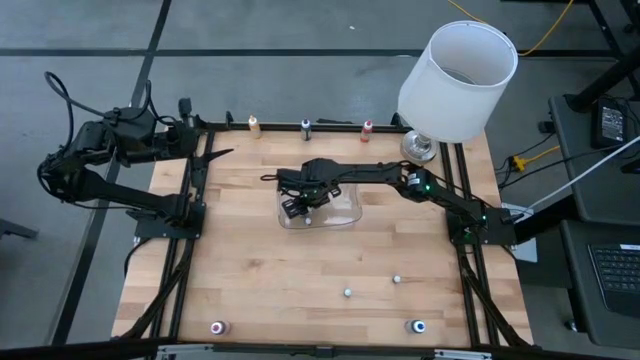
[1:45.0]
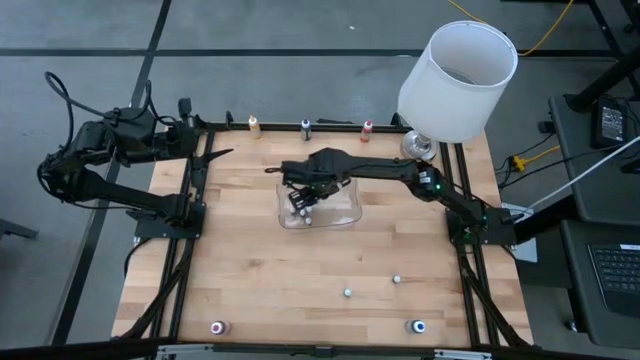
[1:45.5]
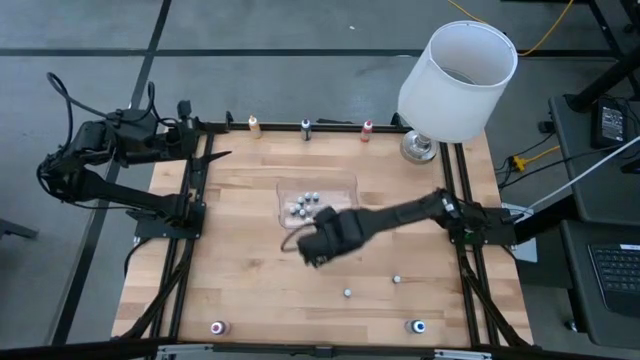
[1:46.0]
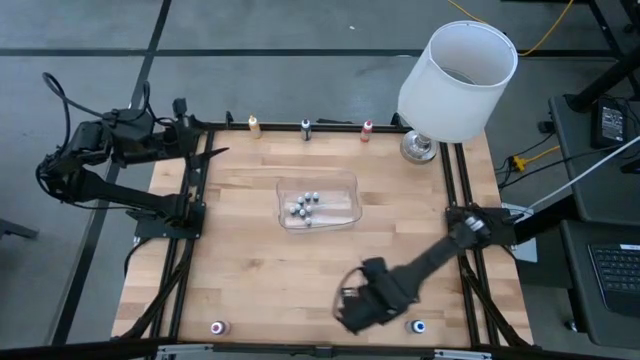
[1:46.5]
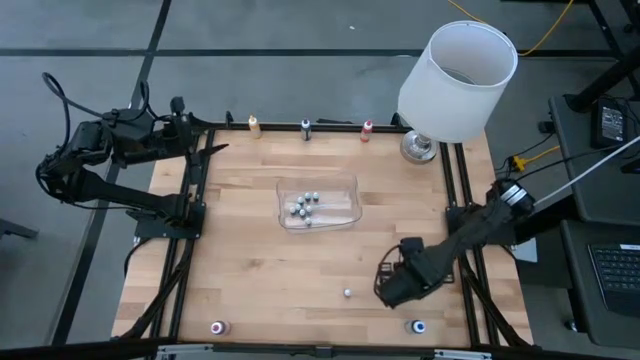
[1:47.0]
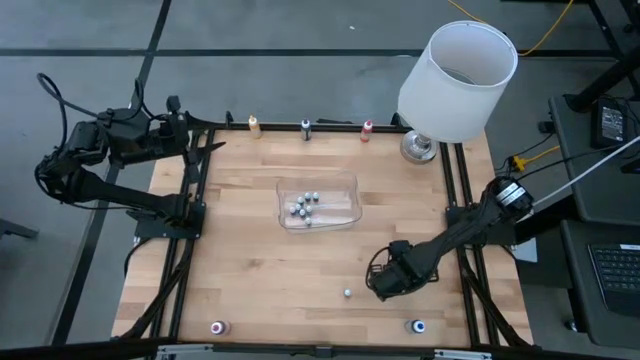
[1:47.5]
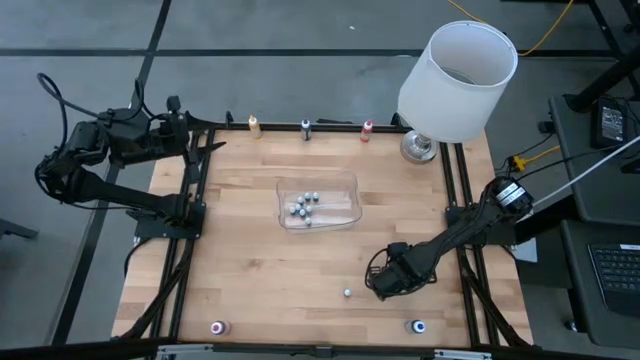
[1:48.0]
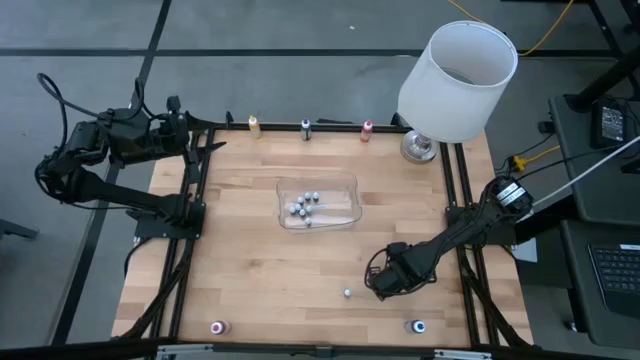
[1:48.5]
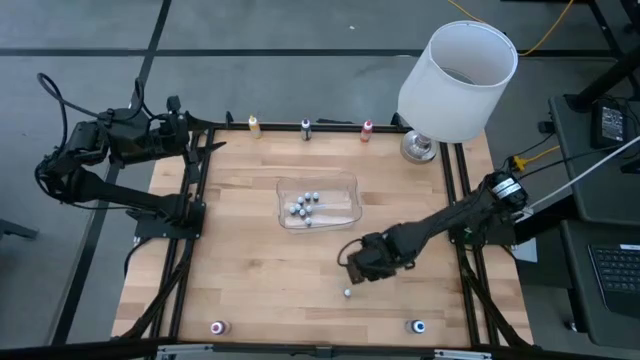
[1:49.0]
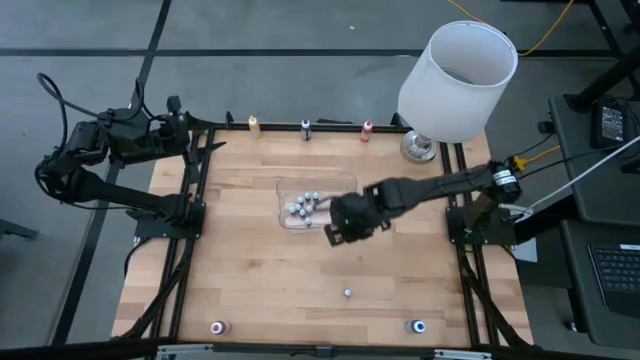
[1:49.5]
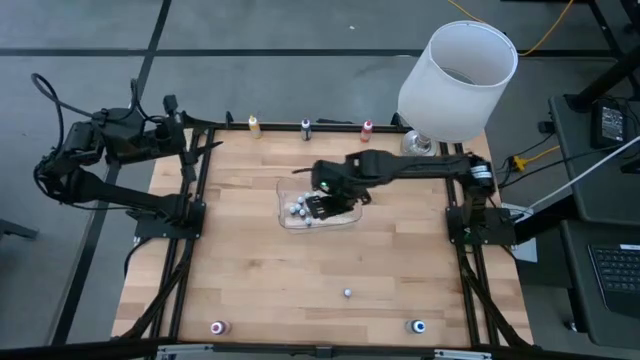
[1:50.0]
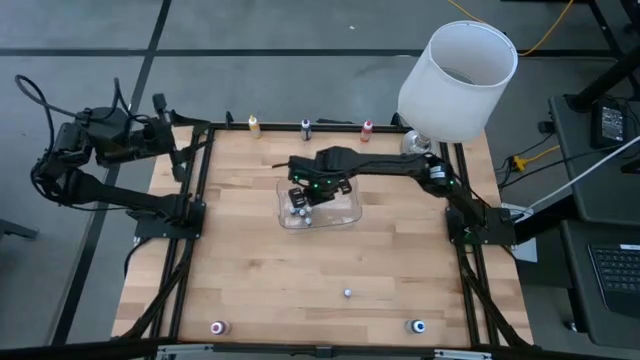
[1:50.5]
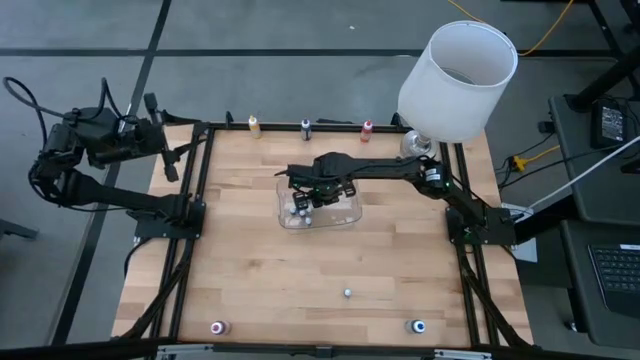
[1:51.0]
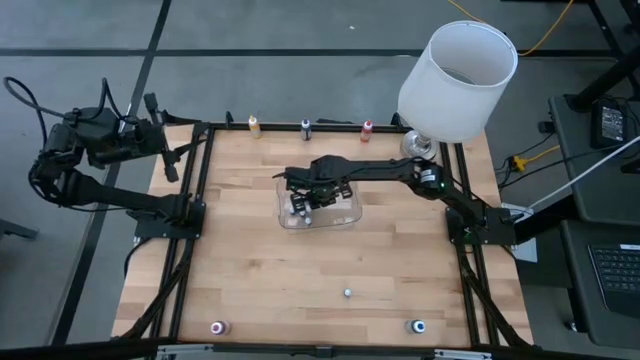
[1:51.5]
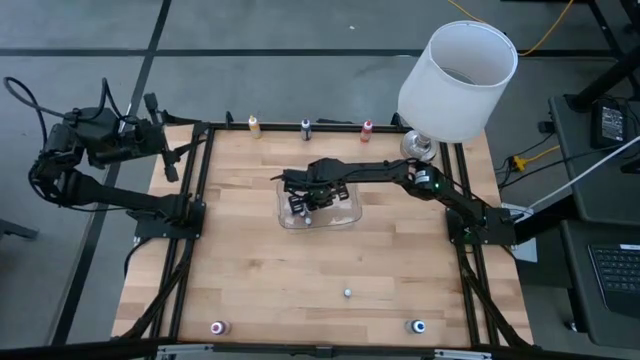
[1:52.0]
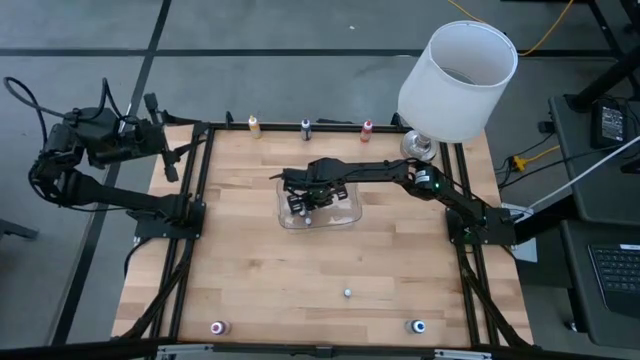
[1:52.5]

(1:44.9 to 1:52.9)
Task: Pick & Place food coloring
Put the pink food coloring bottle into the transparent bin

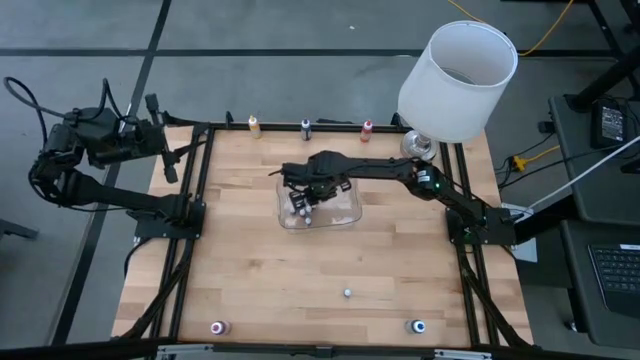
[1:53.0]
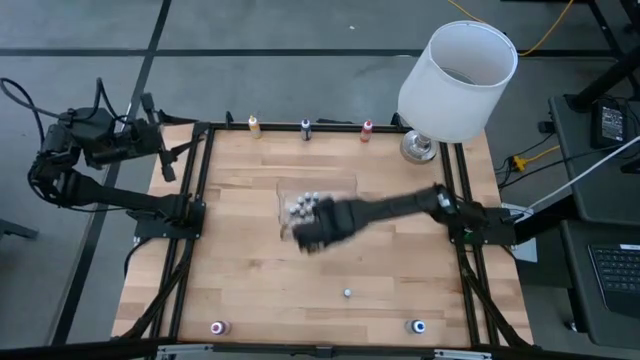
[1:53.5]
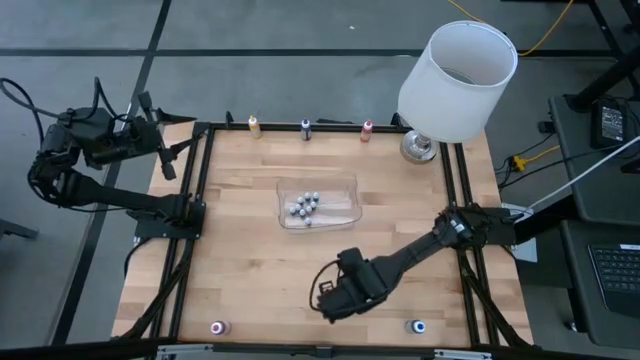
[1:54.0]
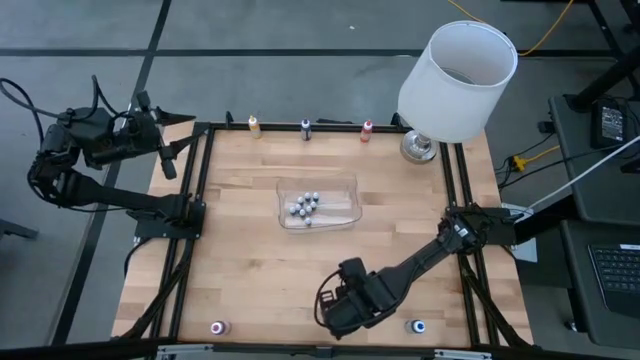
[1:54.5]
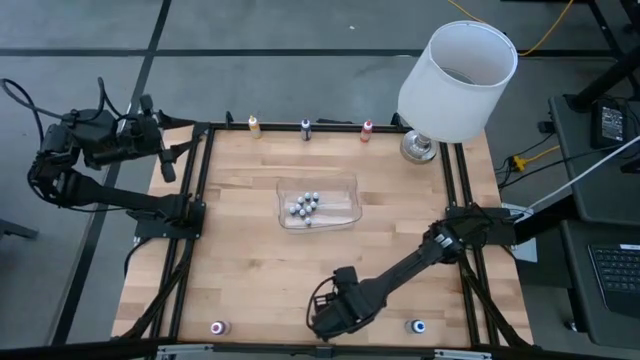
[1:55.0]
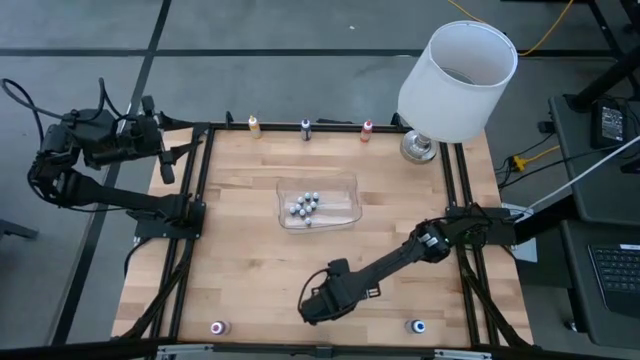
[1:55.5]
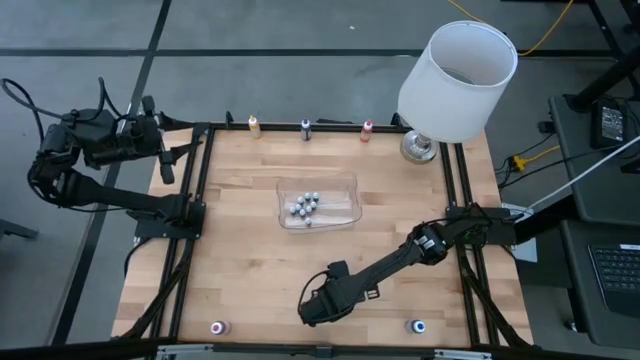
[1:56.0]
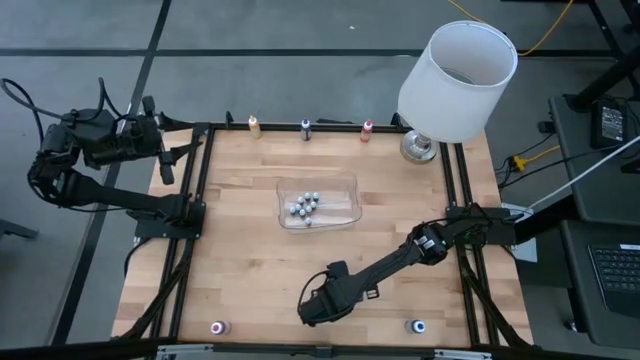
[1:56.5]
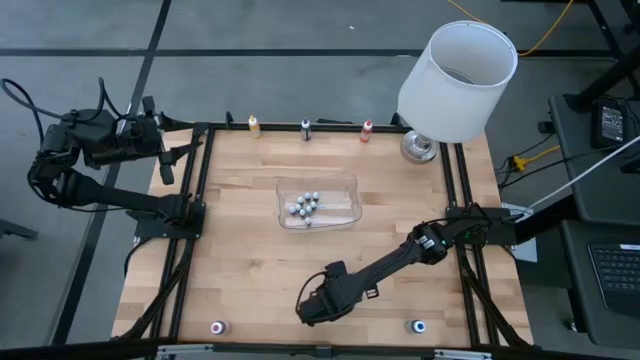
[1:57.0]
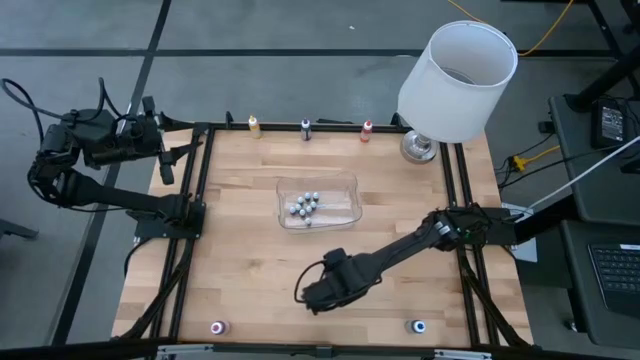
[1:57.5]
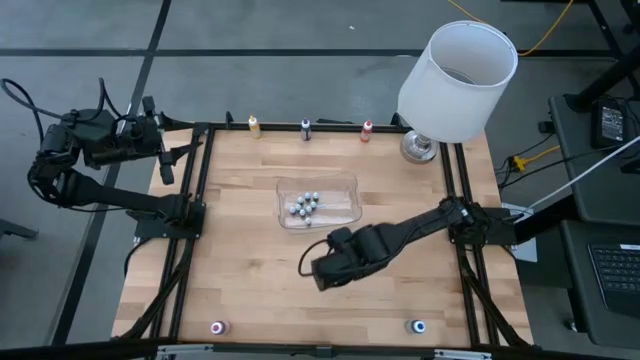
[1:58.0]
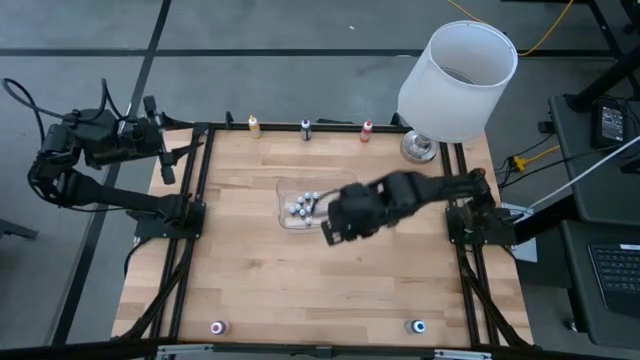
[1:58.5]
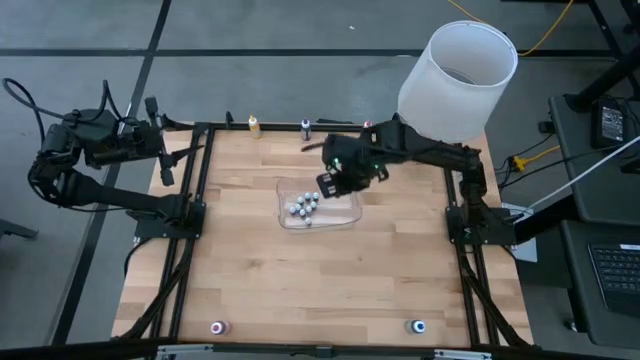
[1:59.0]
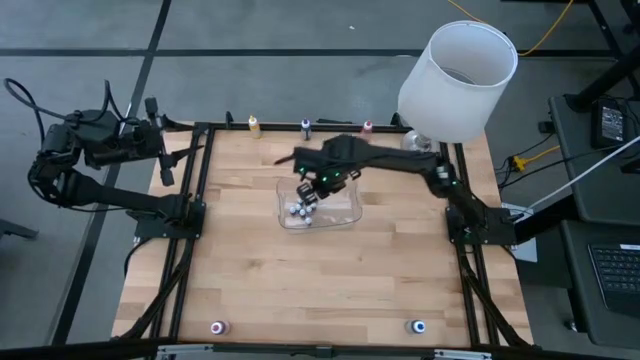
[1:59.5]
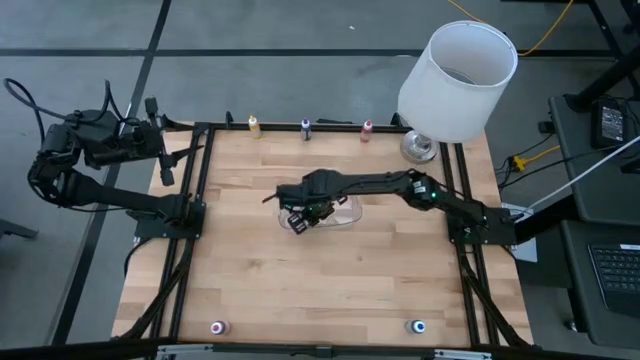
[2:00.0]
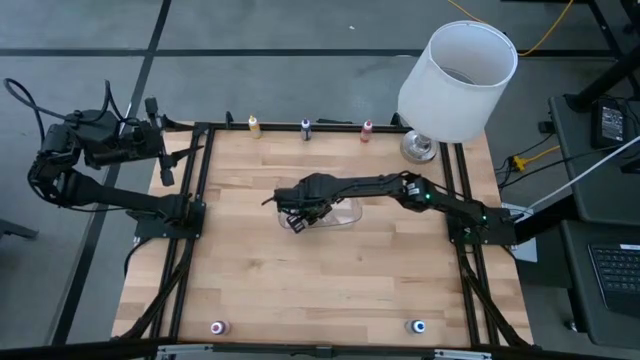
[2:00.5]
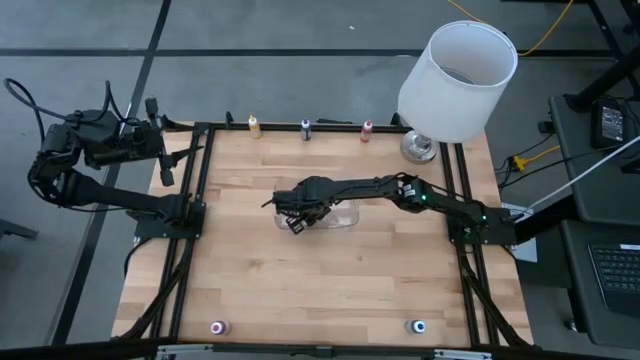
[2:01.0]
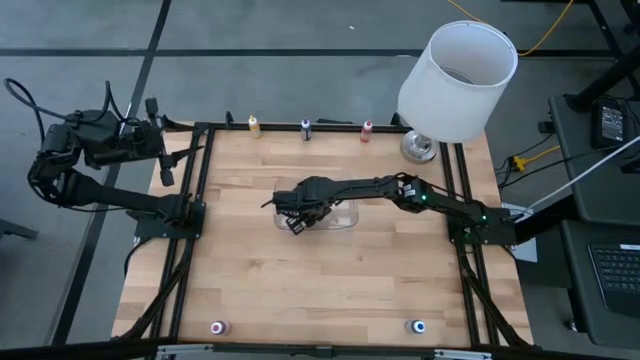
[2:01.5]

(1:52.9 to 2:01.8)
Put the violet food coloring bottle into the transparent bin

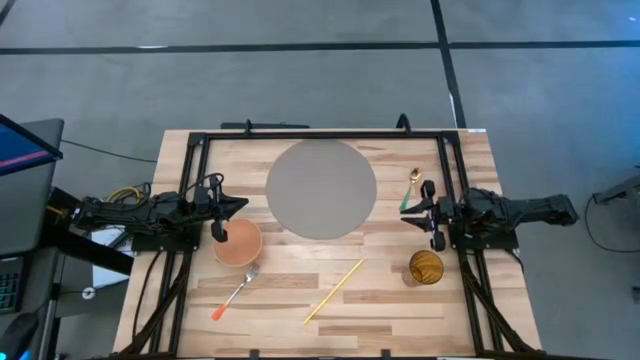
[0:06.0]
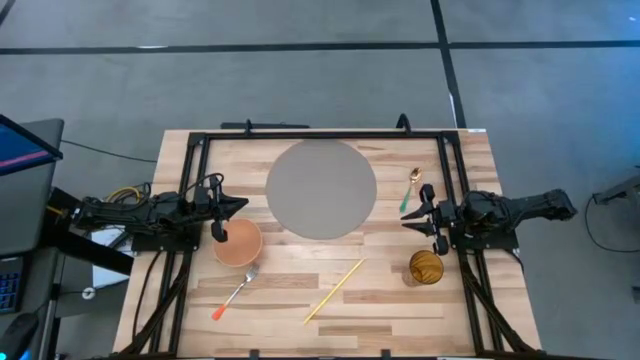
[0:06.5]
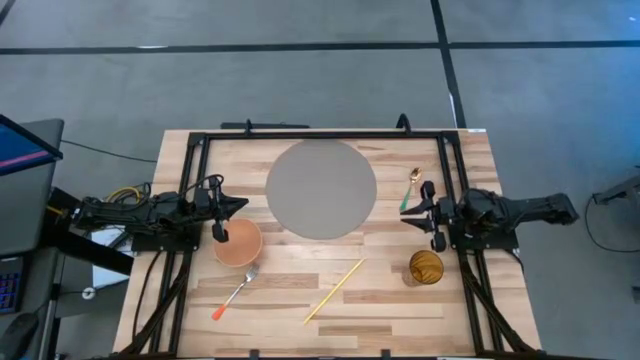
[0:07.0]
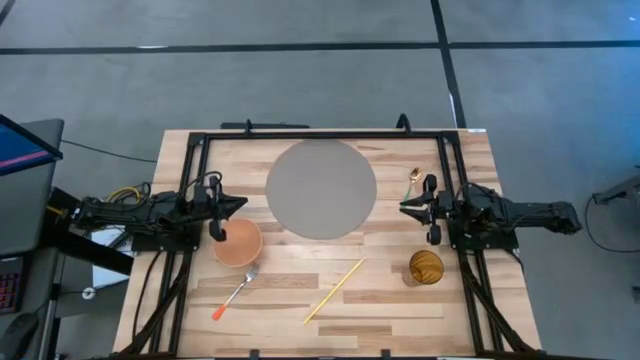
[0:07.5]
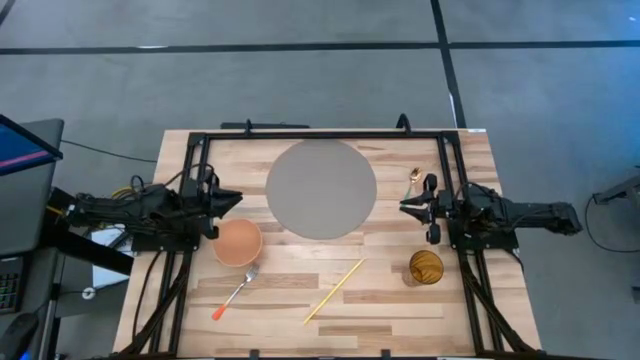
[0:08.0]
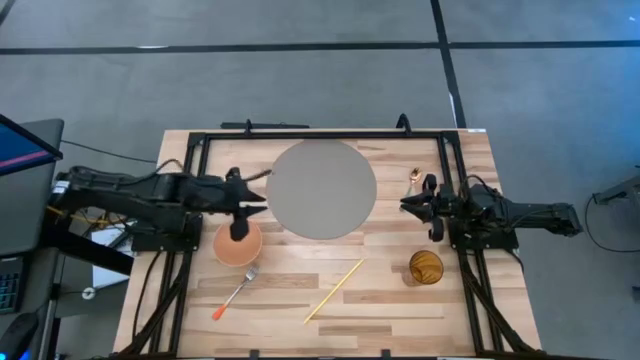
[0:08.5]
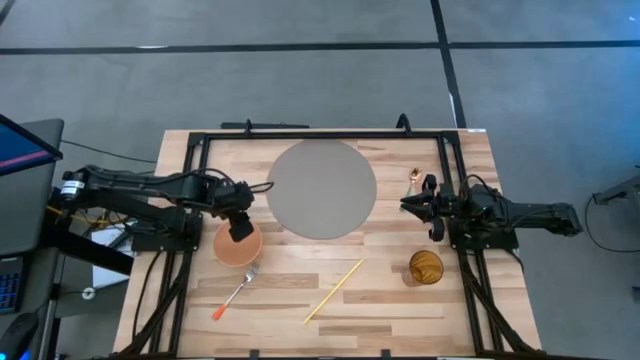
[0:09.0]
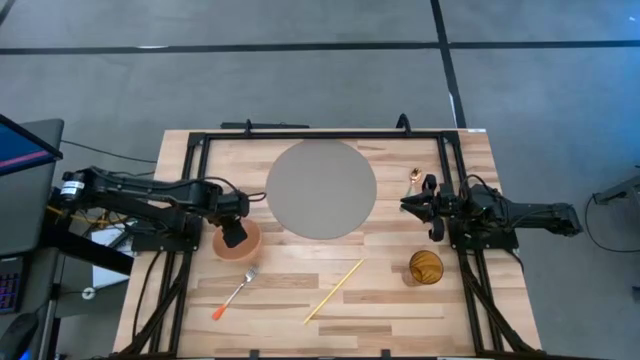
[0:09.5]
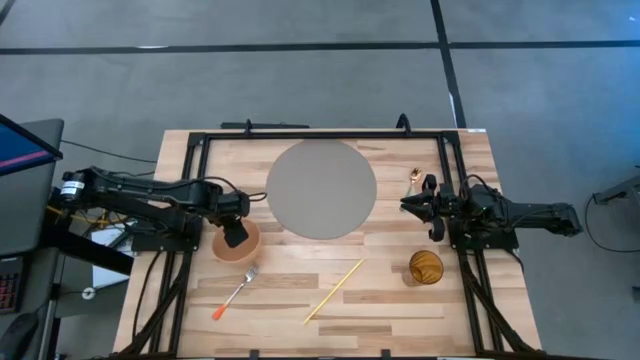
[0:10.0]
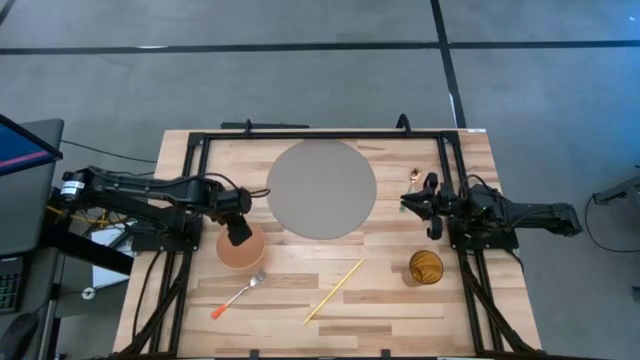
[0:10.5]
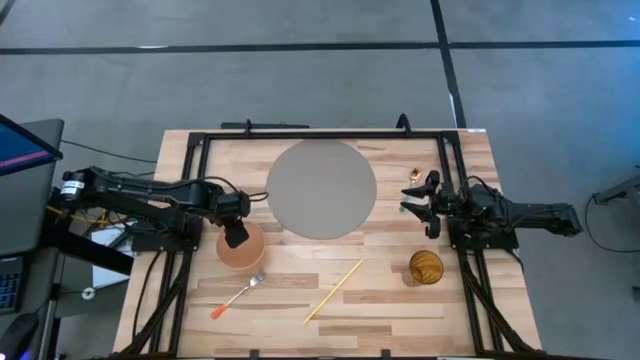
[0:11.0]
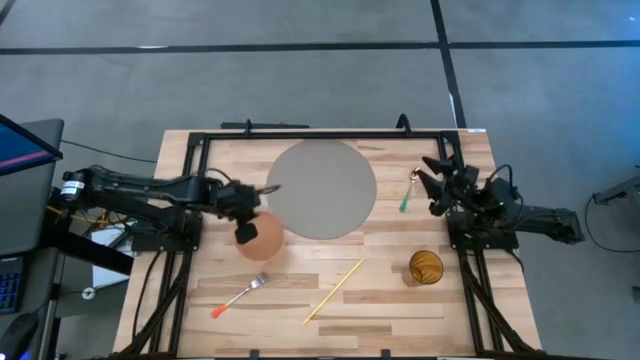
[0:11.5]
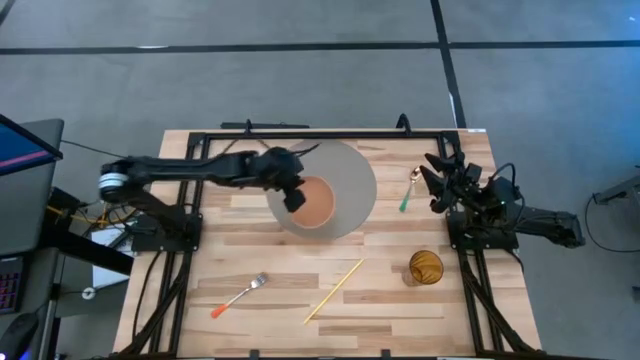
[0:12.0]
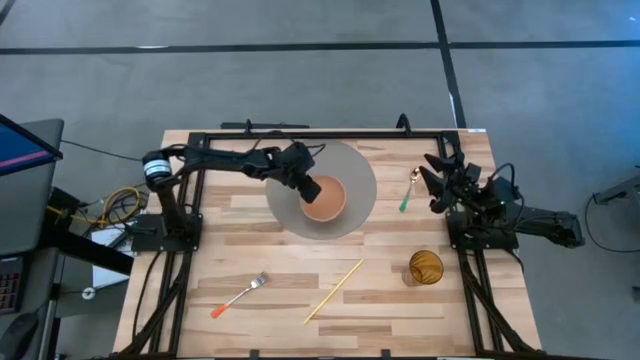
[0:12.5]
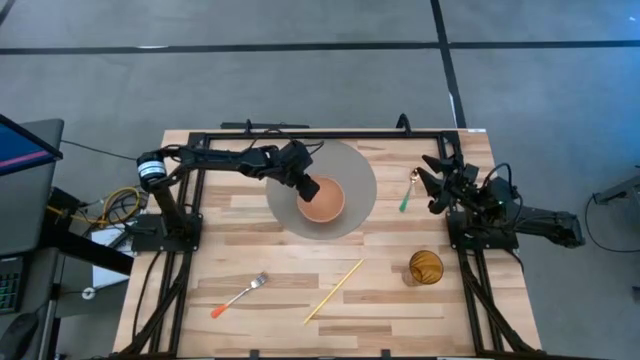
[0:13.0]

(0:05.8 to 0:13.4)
Task: Pick & Place Utensil
Put the orange bowl on the gray table placemat
